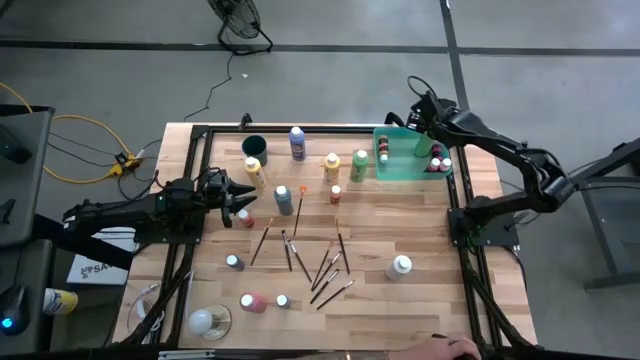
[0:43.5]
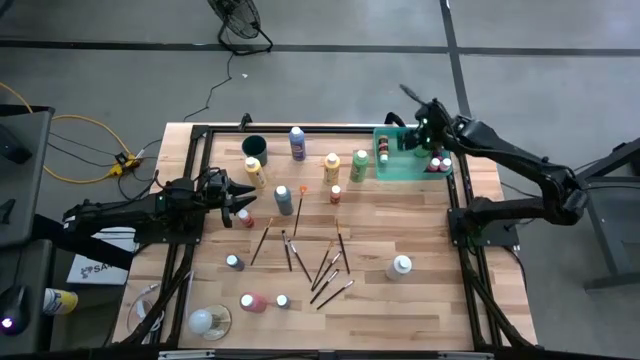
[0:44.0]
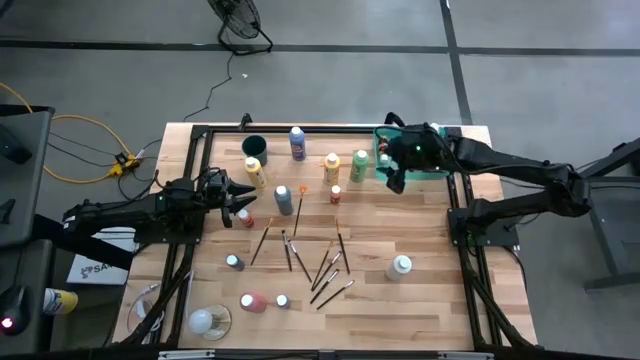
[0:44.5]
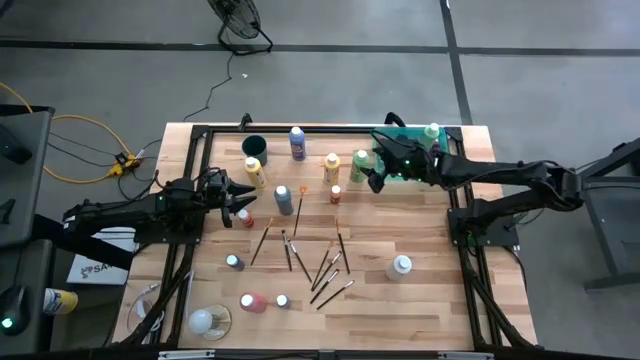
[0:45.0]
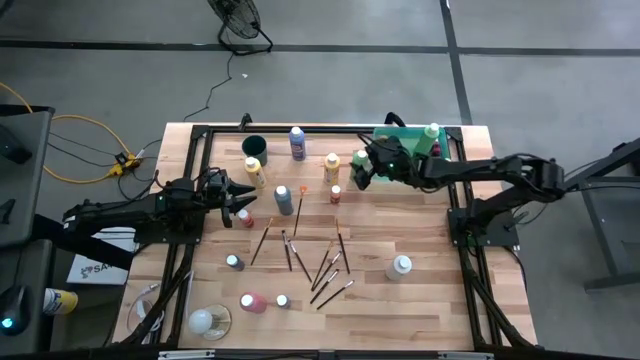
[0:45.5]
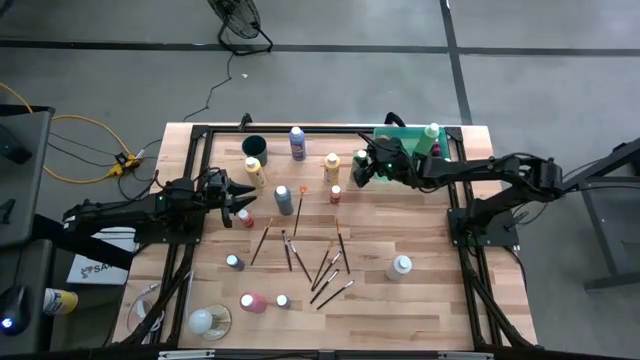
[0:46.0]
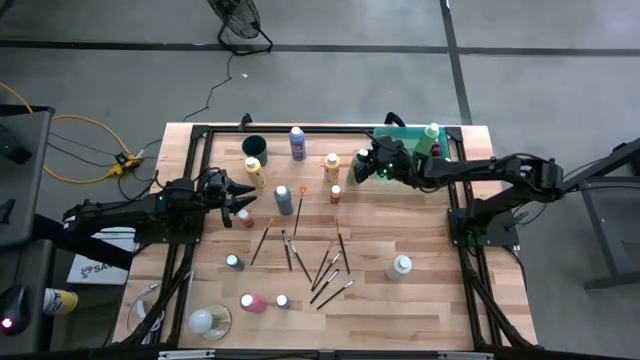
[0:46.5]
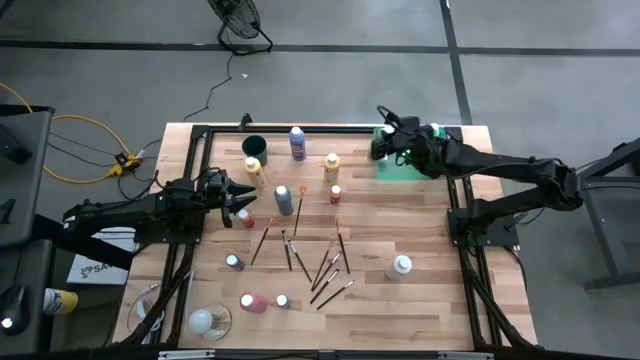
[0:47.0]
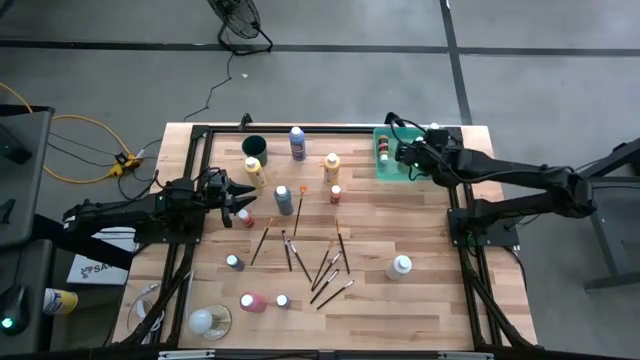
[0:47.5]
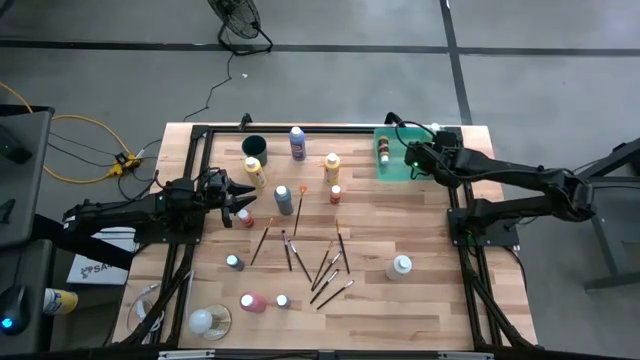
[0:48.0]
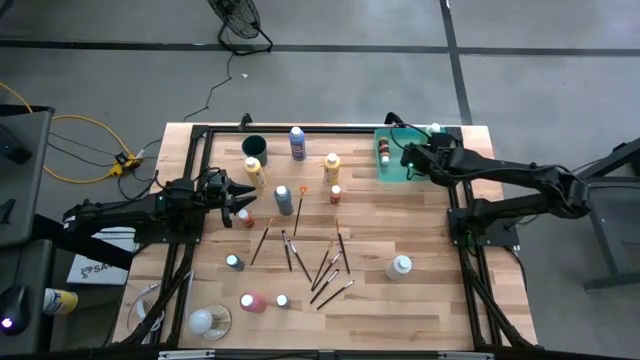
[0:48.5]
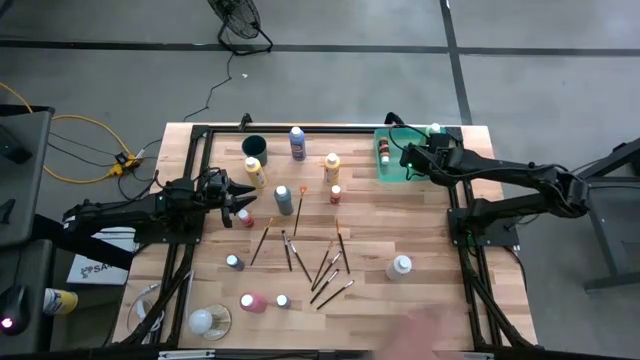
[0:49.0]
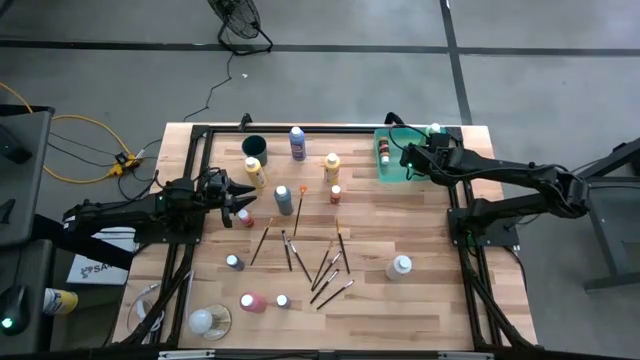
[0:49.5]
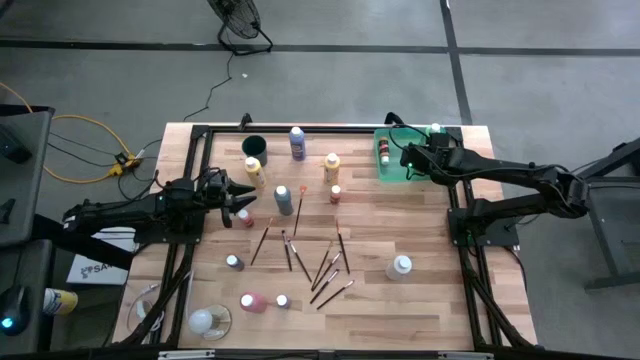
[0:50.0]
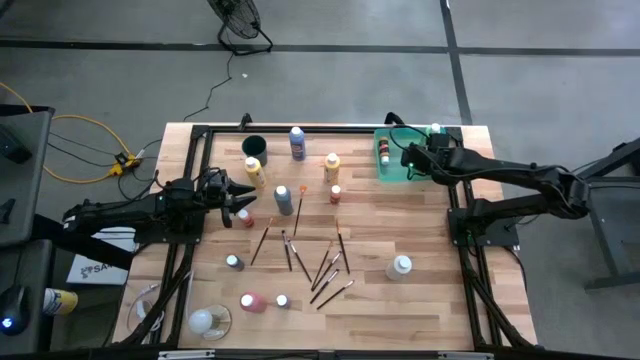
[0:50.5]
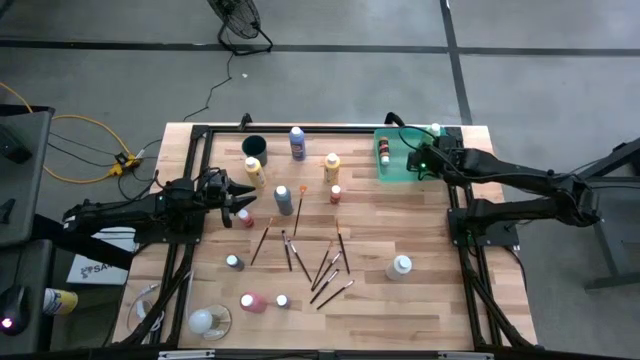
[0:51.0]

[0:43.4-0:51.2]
Task: Pick & Place Paint Supplies
Put the big green paint bottle into the green bin

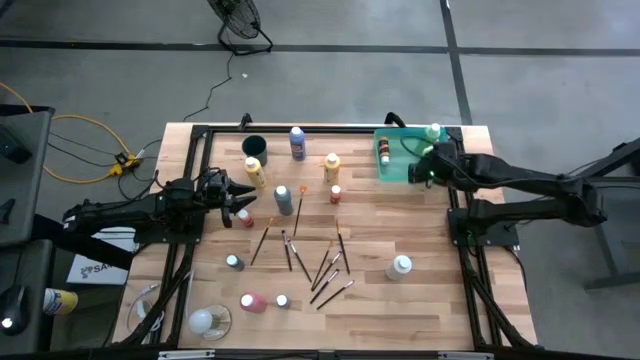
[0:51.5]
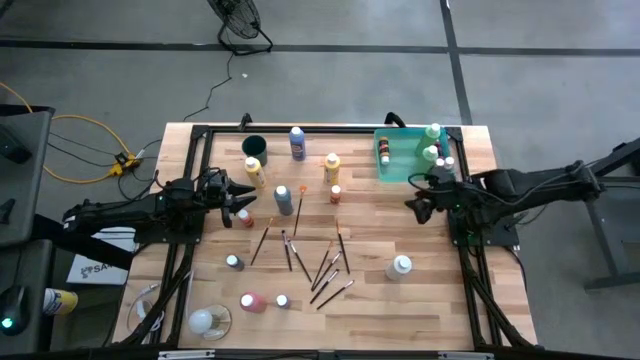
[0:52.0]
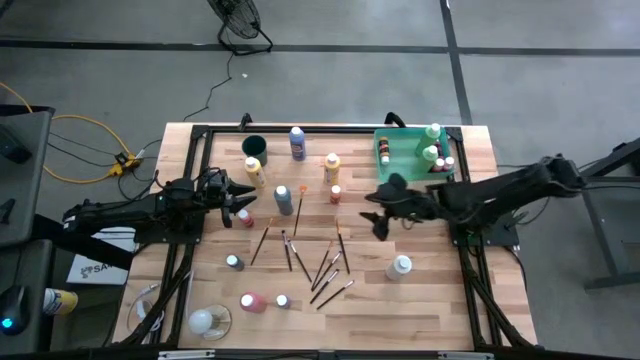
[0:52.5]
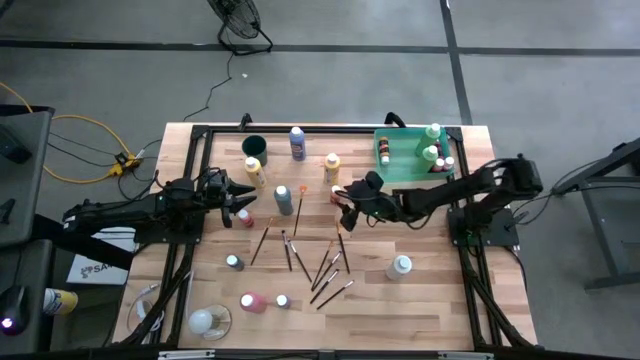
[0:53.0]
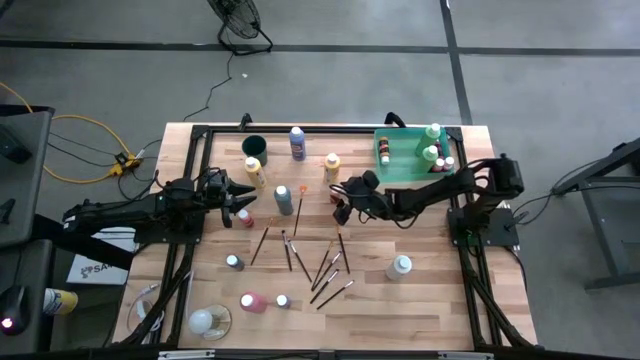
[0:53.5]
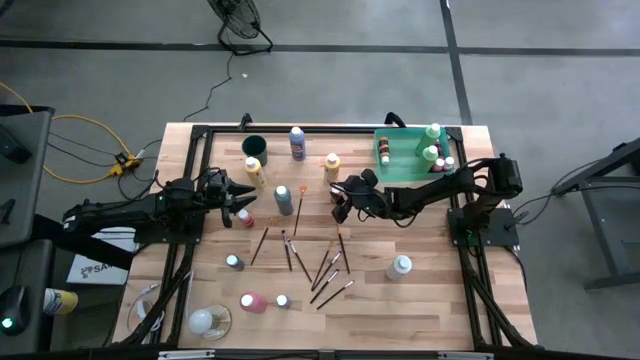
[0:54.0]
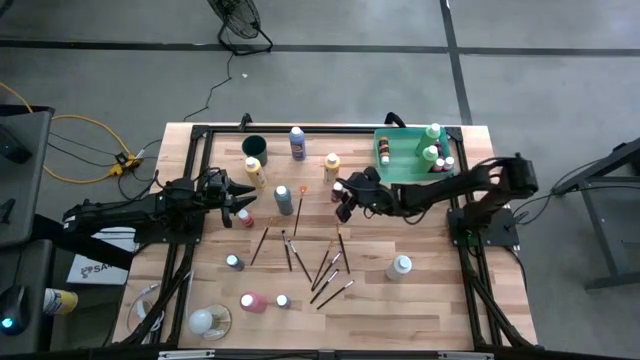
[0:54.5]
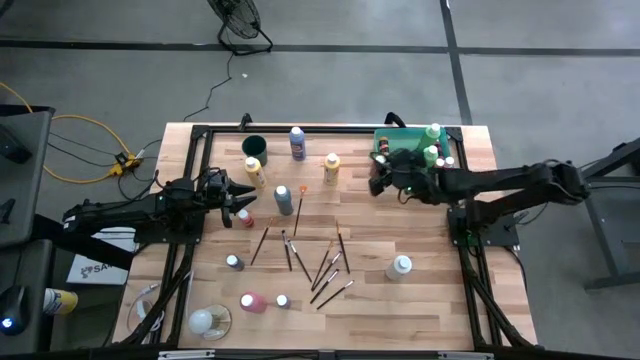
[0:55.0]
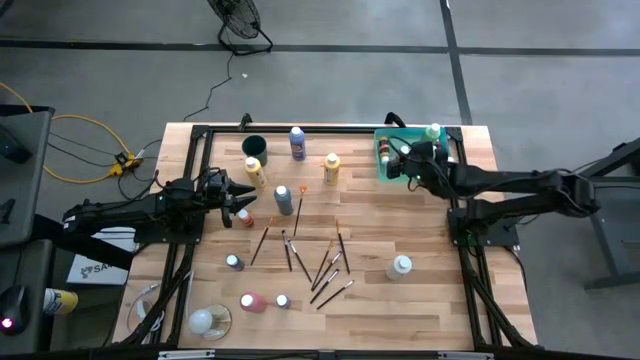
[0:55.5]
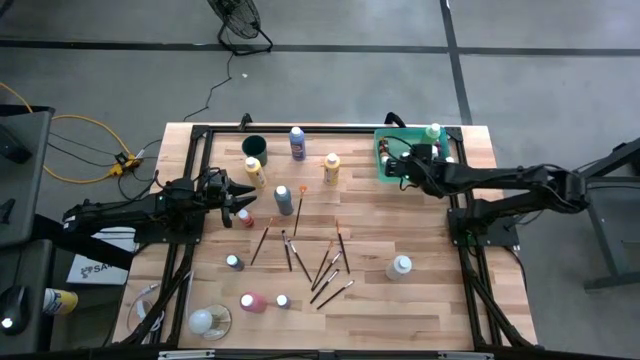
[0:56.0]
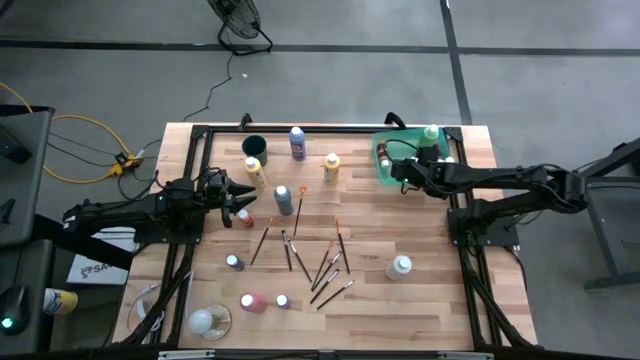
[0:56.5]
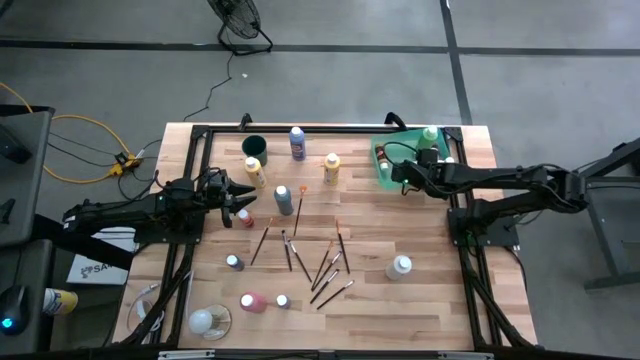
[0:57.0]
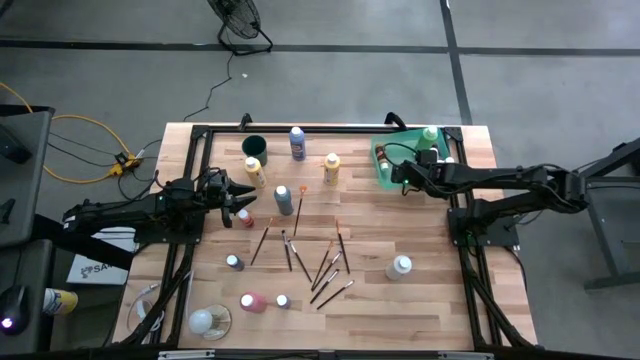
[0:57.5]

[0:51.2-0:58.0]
Put the small orange paint bottle into the green bin

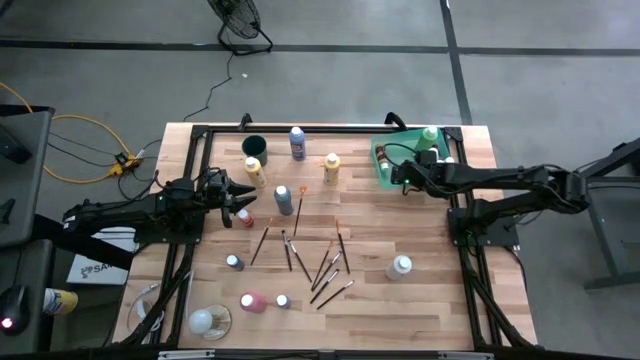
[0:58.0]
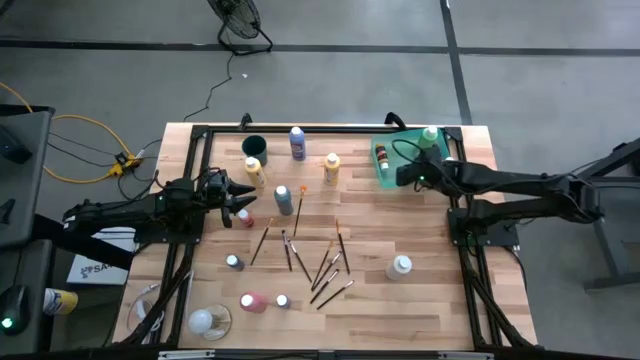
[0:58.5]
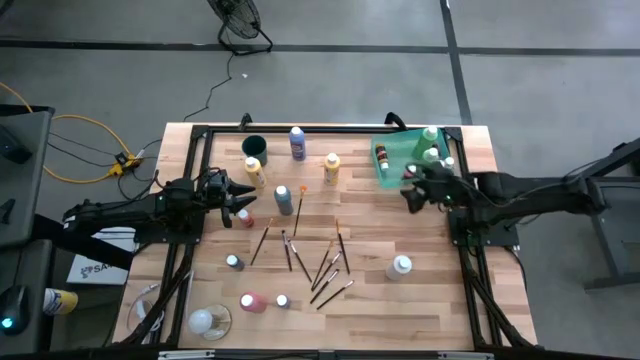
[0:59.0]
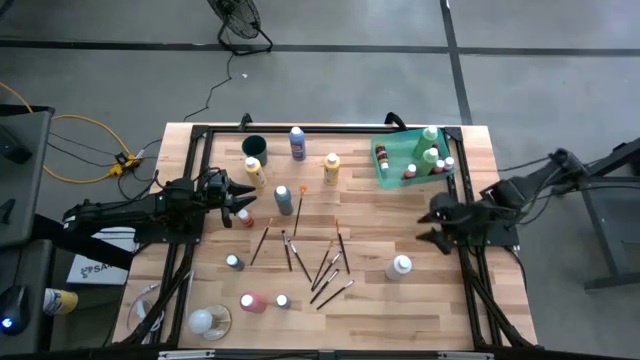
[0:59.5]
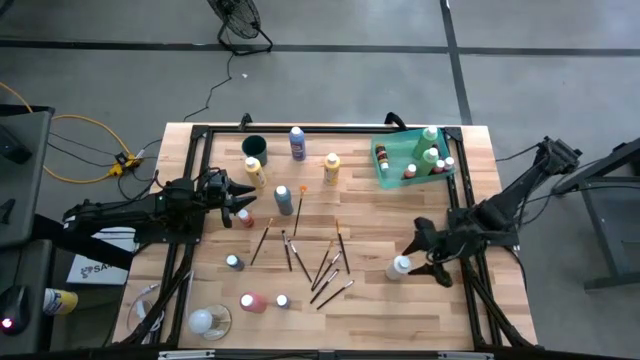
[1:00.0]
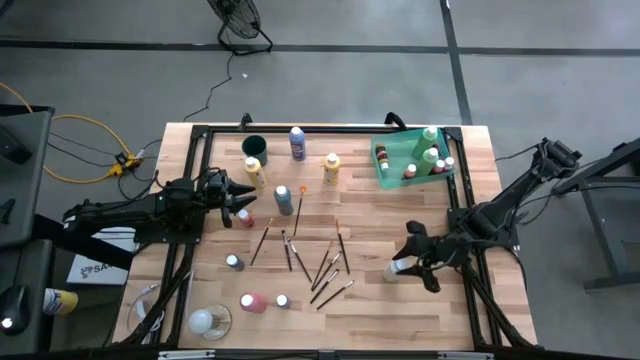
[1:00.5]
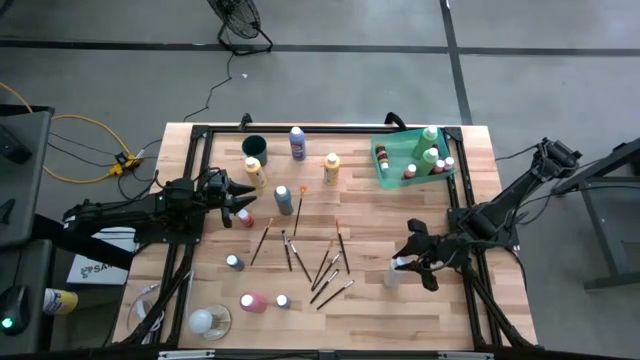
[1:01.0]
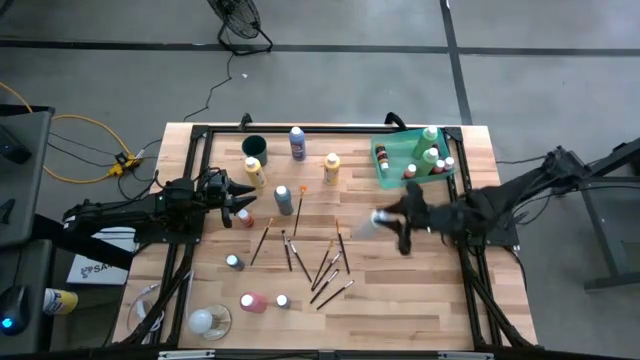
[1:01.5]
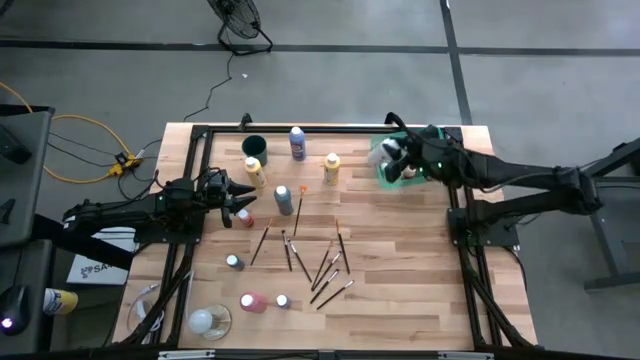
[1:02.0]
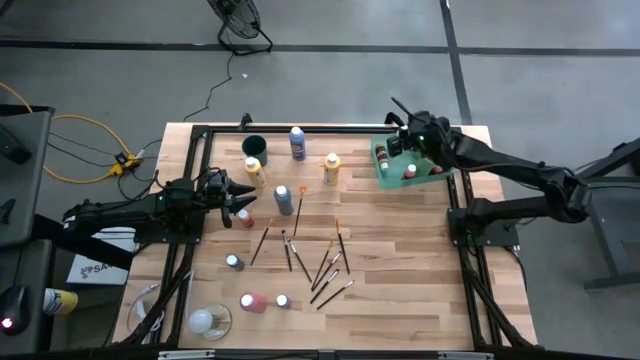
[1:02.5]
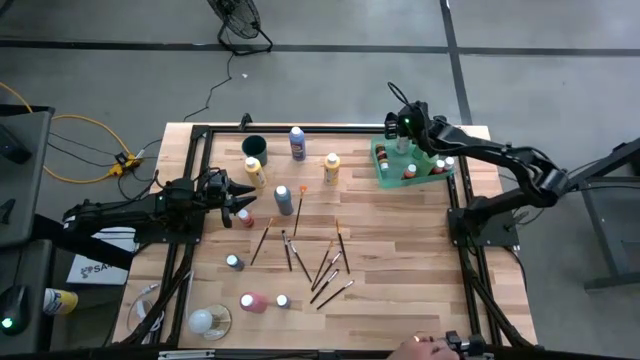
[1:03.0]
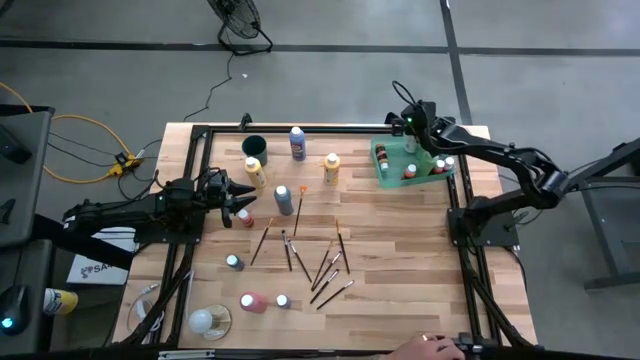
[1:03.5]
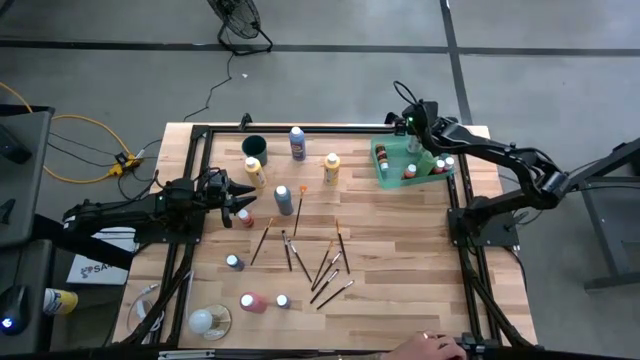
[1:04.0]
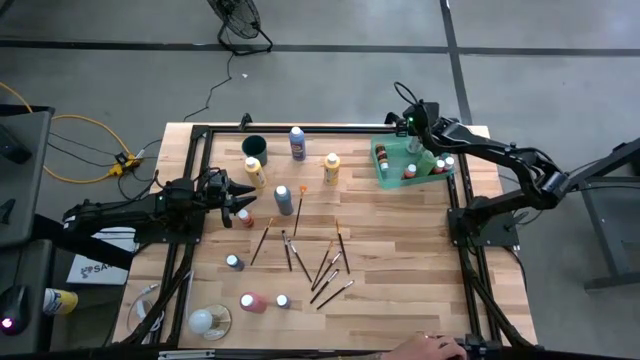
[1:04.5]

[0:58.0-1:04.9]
Put the big white paint bottle into the green bin
